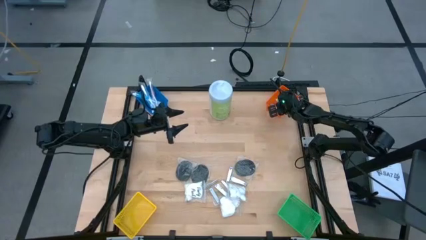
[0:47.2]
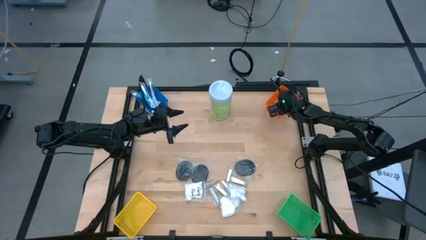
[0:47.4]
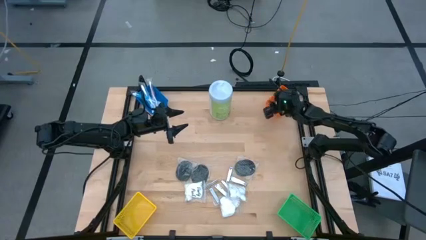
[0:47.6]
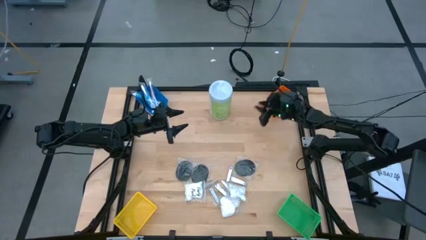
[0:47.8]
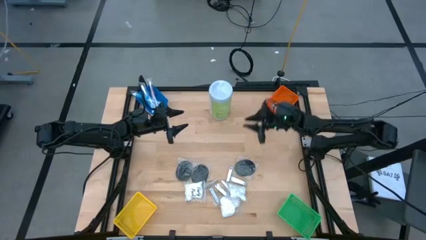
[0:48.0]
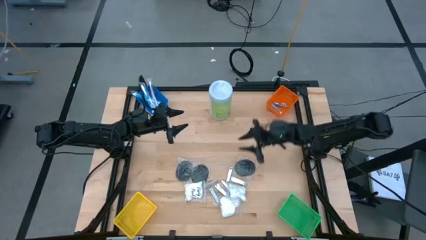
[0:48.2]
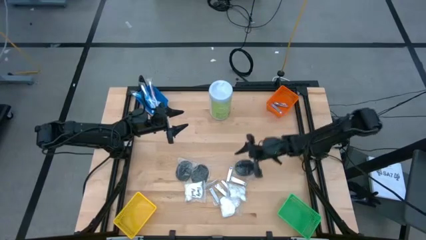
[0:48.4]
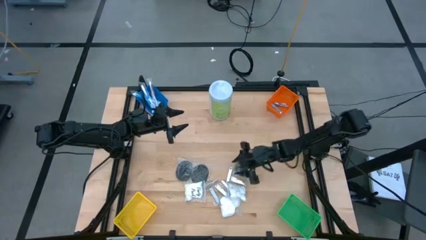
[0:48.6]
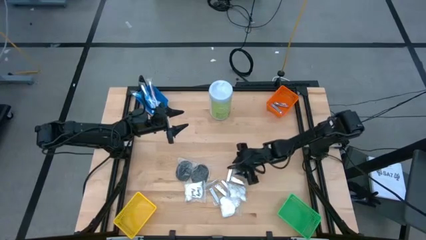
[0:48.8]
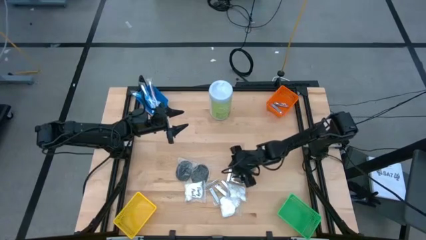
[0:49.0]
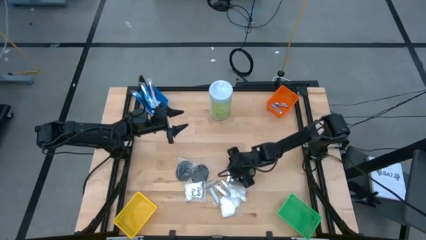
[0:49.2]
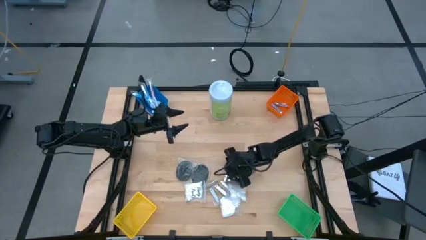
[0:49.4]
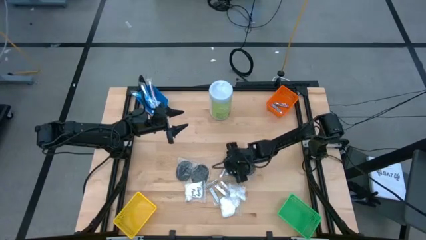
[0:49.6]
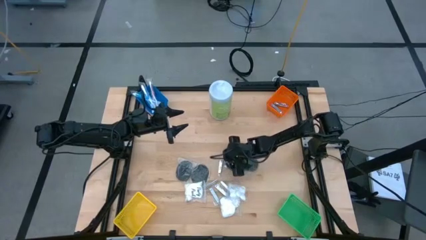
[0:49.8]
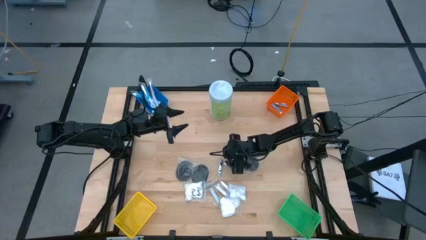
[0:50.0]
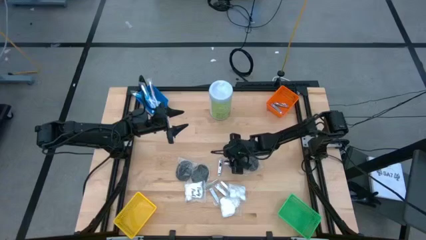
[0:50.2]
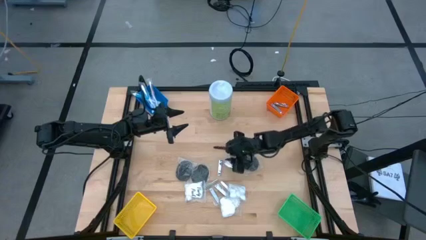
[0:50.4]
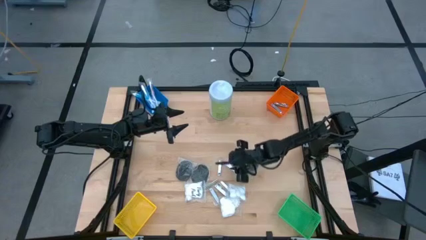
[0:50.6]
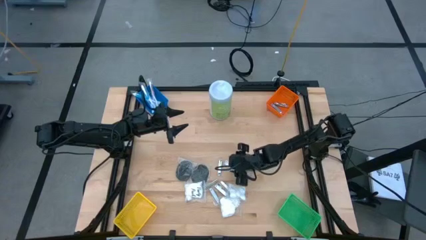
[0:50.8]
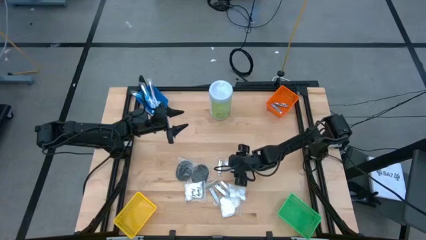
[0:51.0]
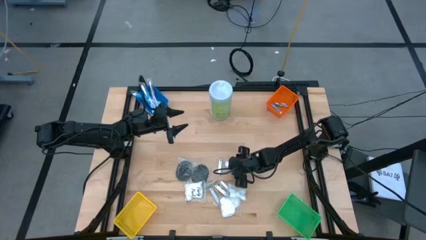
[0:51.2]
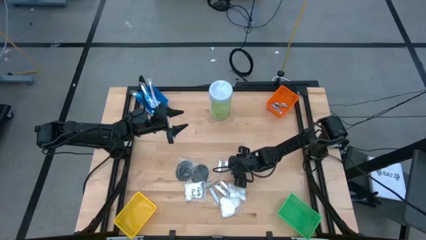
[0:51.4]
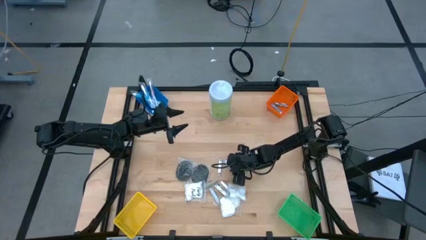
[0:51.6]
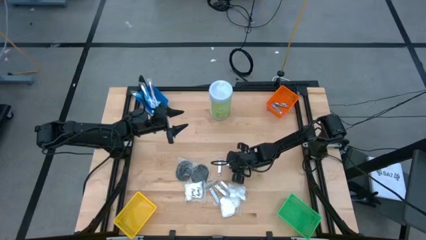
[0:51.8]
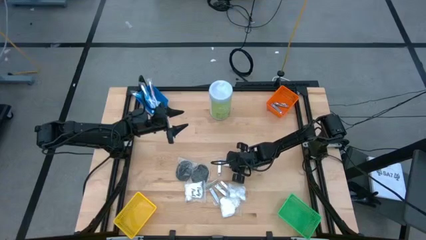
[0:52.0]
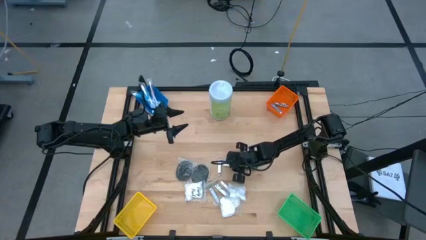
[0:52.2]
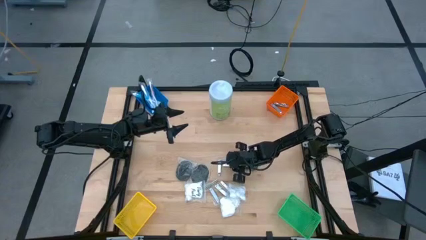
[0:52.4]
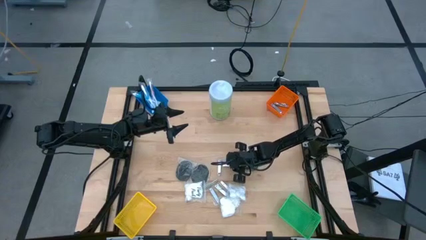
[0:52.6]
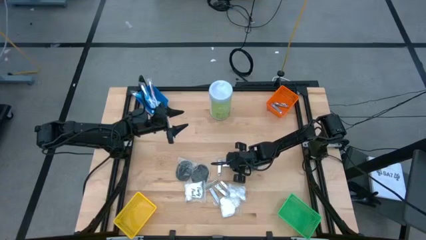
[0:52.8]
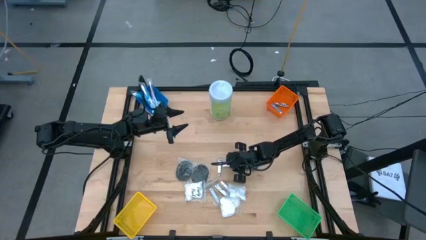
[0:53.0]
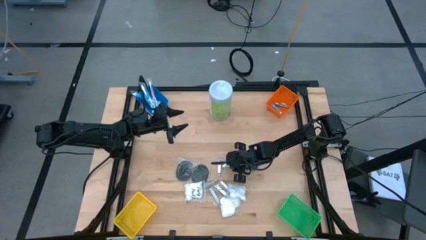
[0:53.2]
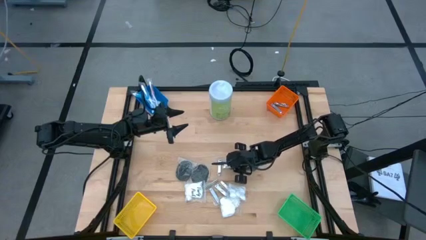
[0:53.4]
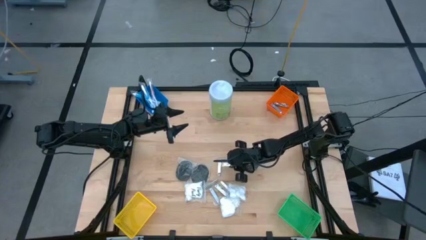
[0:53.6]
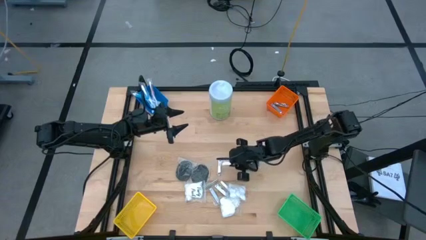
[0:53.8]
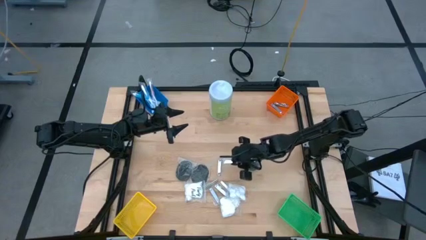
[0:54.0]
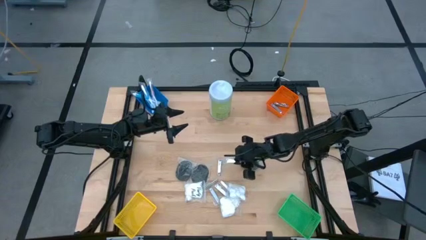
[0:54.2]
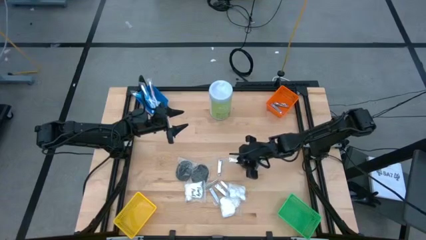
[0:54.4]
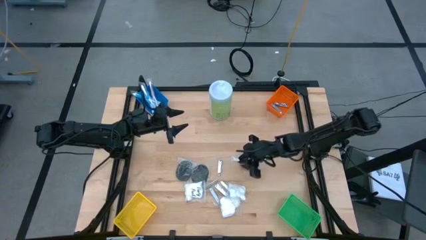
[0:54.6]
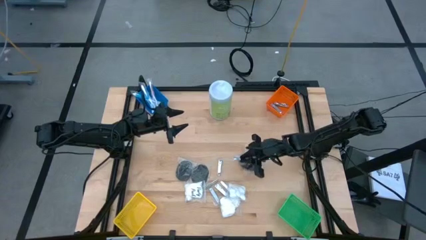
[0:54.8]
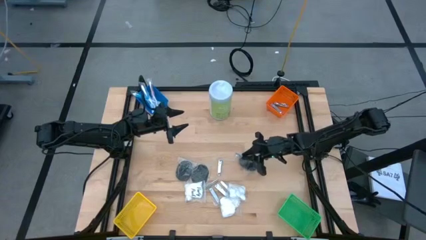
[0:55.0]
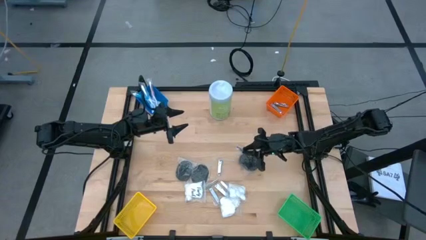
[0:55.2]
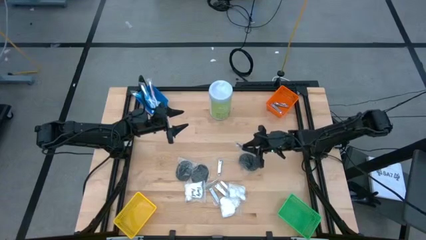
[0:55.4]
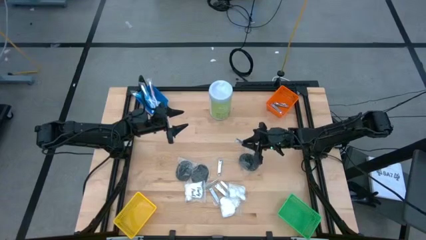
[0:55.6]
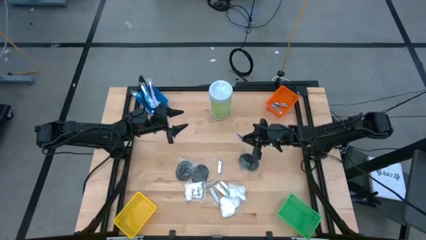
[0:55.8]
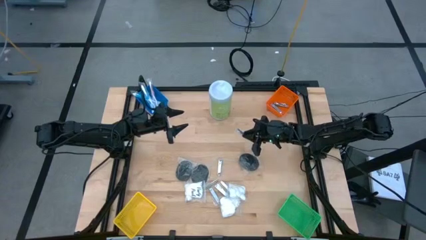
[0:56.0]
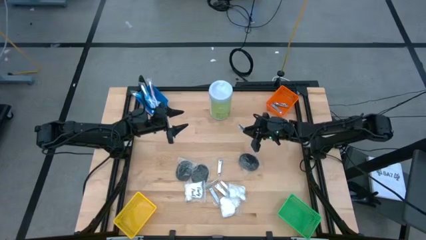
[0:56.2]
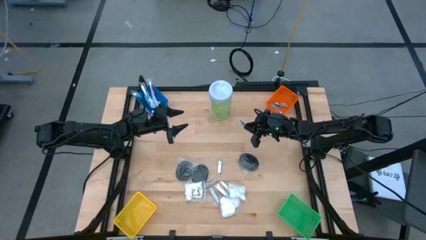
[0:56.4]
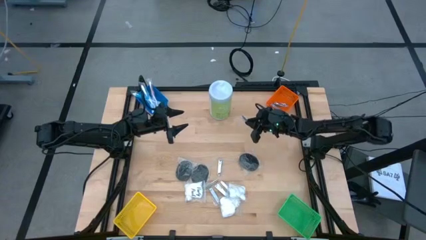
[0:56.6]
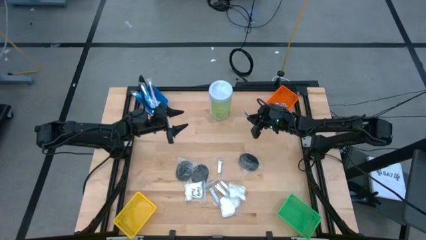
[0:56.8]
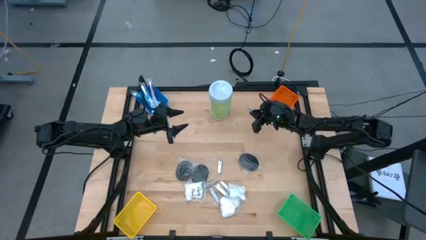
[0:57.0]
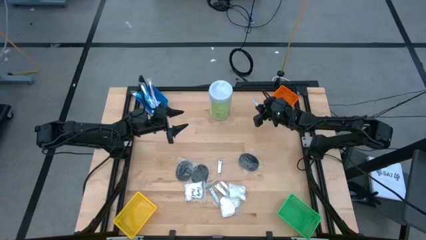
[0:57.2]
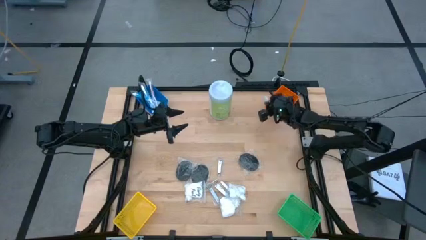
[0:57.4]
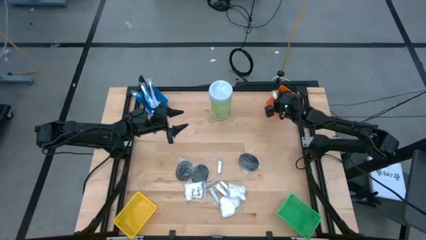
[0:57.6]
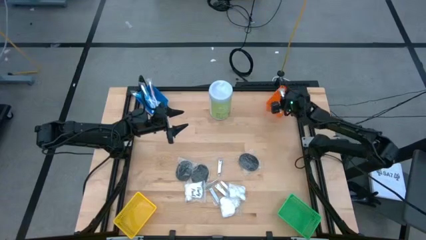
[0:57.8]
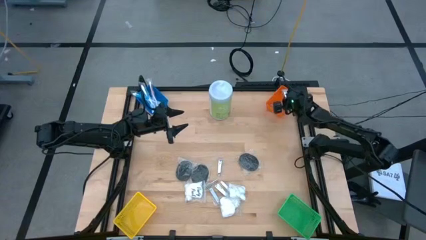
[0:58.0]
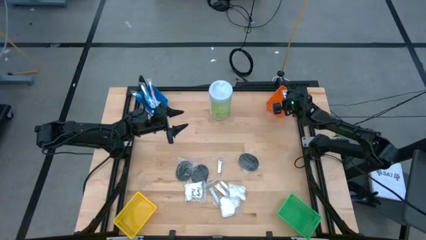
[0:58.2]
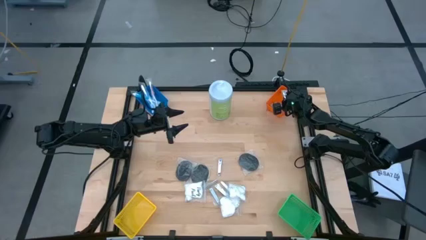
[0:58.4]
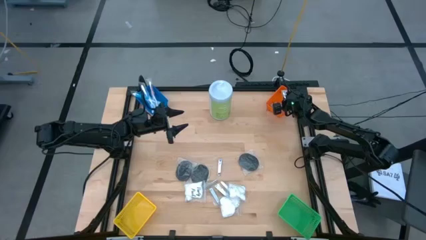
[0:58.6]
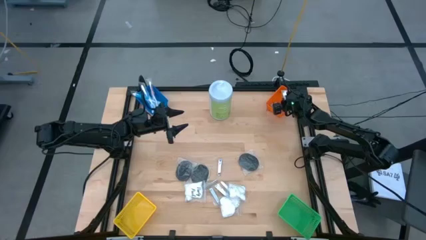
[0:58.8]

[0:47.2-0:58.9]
Task: Pick & Place Travel size toiletries
Put the nail cutter into the orange bin

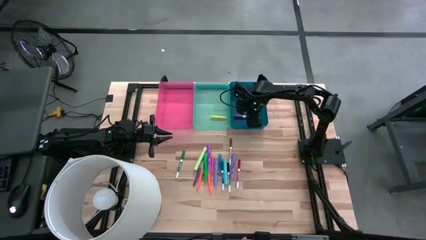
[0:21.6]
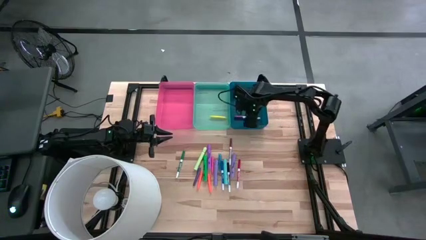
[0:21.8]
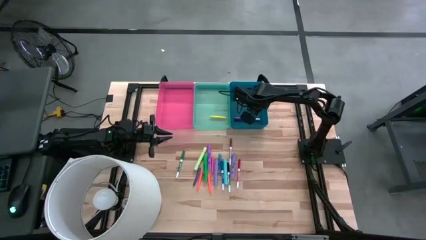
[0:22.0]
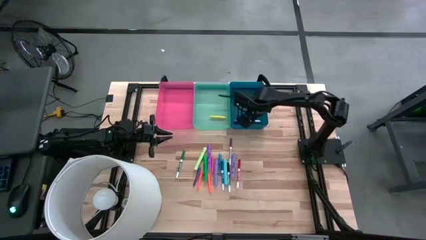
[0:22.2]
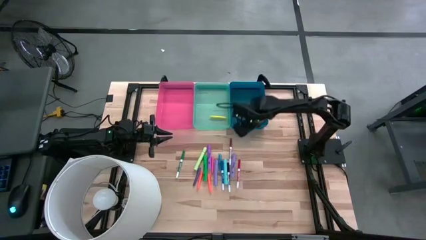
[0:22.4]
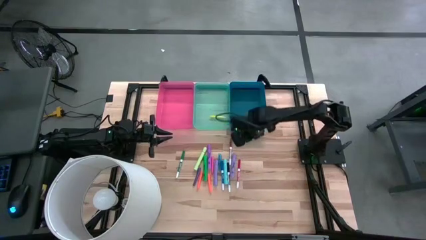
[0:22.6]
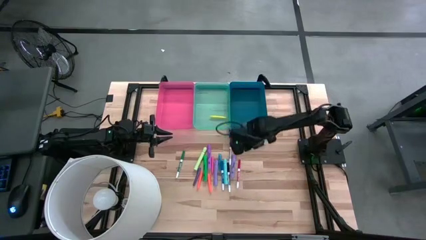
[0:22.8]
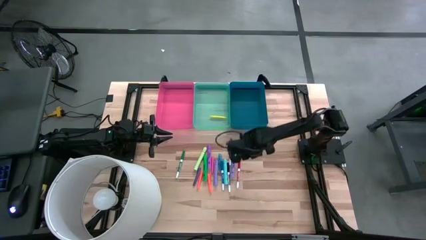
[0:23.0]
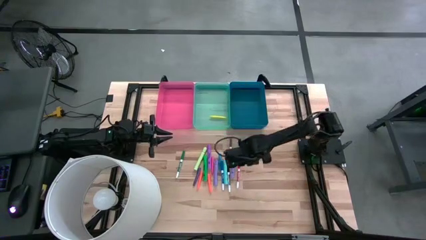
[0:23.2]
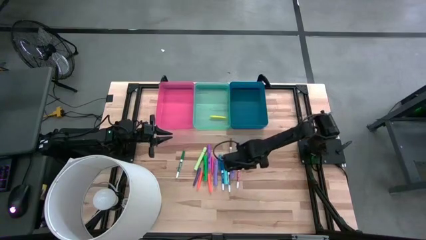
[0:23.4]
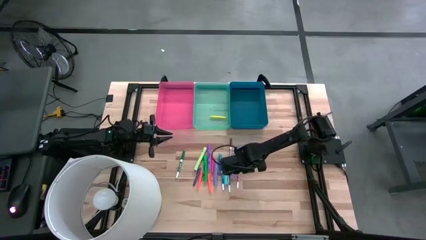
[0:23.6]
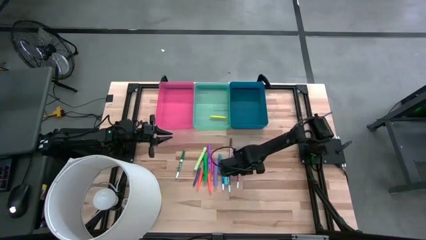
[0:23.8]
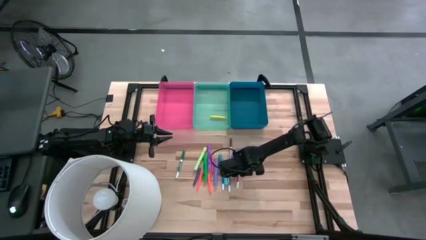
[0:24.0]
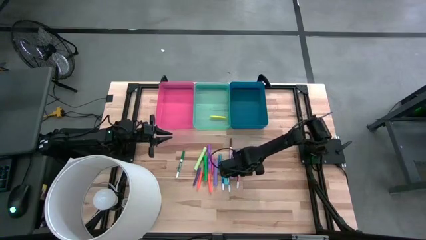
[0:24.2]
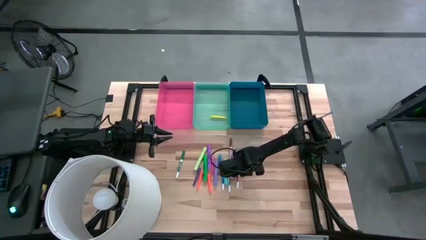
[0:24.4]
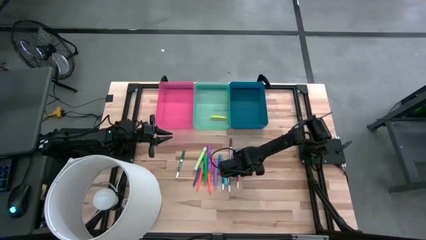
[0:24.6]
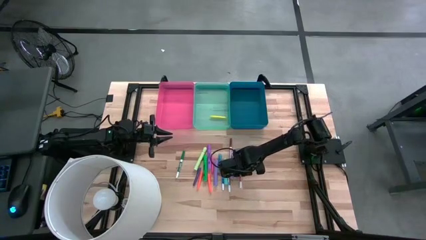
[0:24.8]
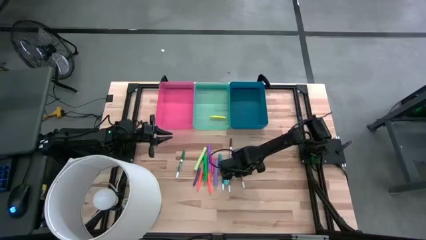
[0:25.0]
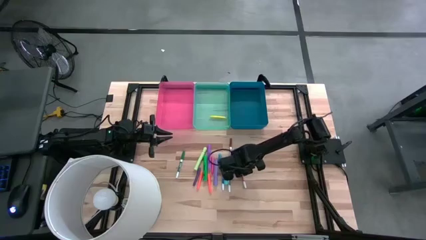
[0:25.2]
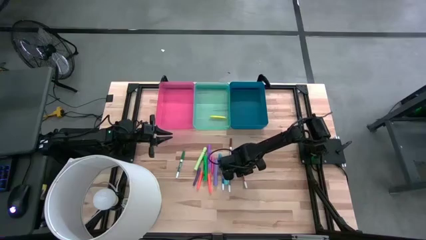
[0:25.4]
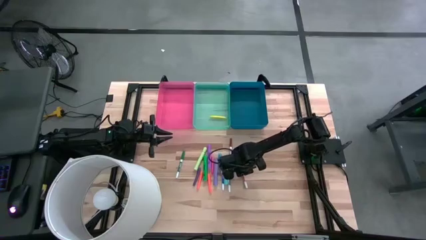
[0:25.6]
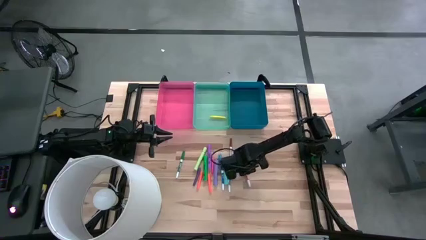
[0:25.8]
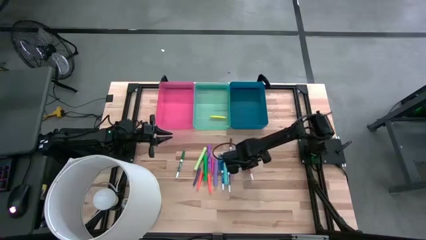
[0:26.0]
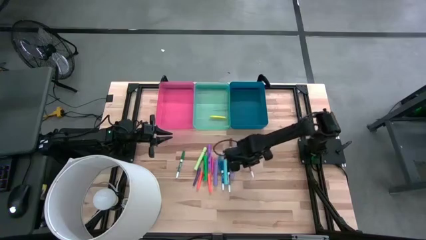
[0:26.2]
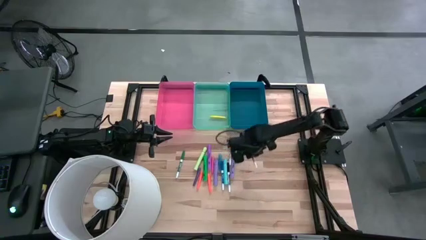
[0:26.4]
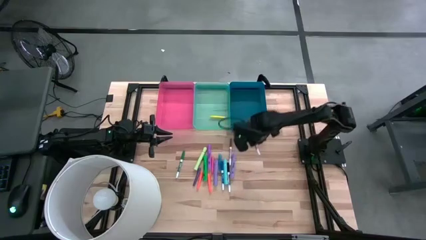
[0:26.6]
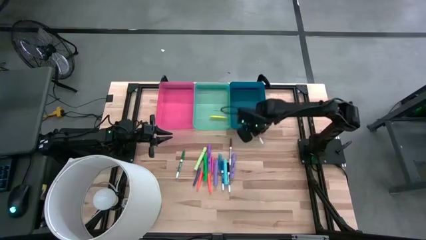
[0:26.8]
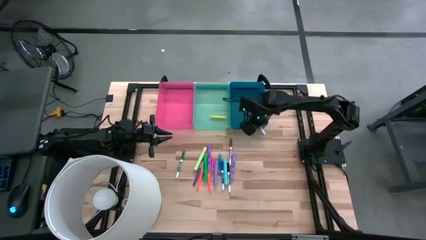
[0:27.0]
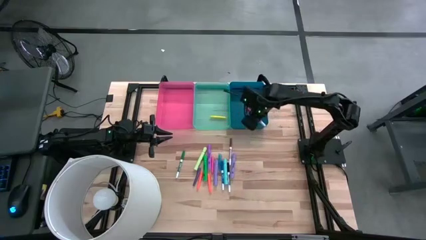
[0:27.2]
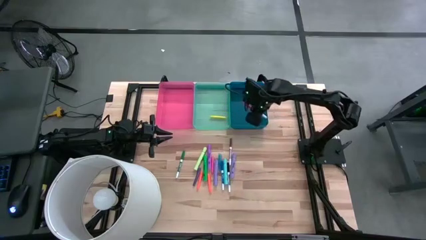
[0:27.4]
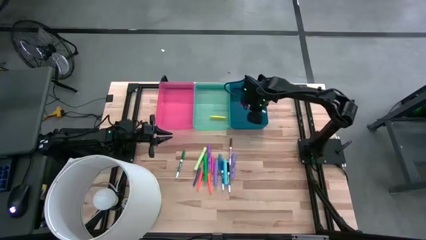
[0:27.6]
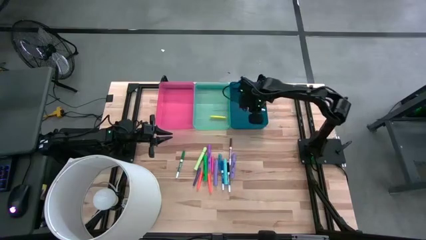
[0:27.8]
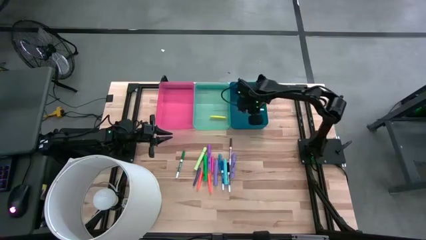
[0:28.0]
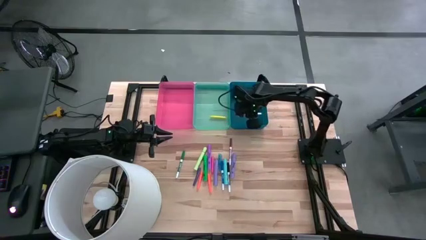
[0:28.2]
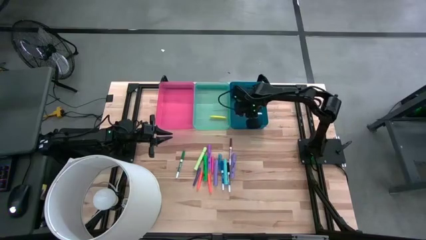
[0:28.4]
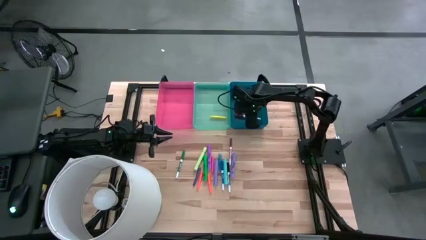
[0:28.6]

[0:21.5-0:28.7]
Task: Pick & Place Markers
Put the red highlighter into the blue bin
